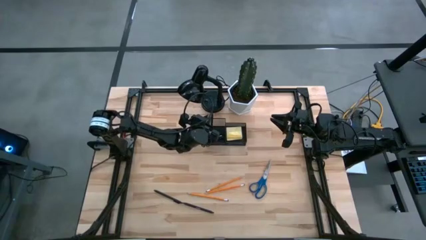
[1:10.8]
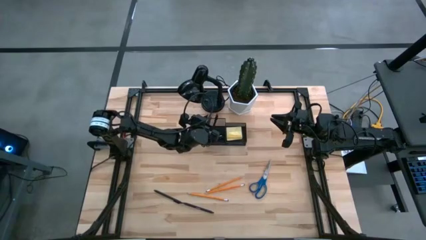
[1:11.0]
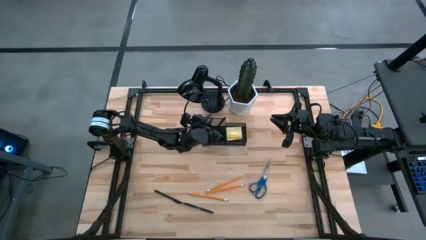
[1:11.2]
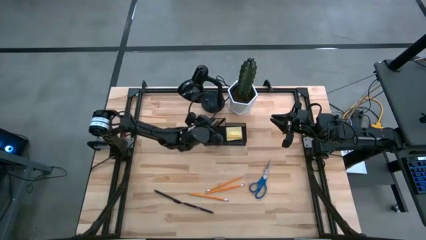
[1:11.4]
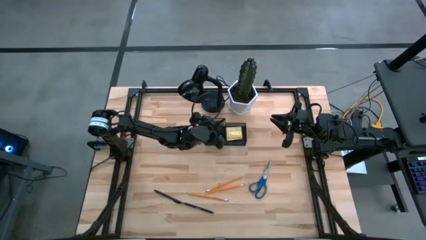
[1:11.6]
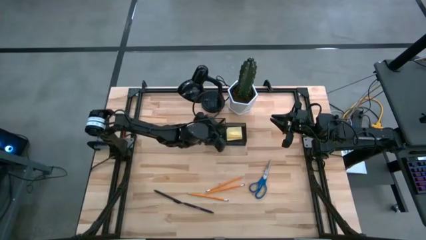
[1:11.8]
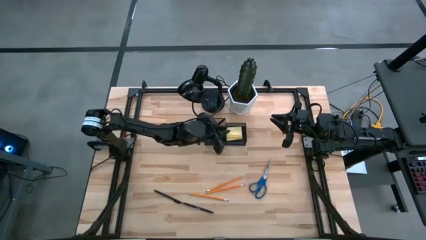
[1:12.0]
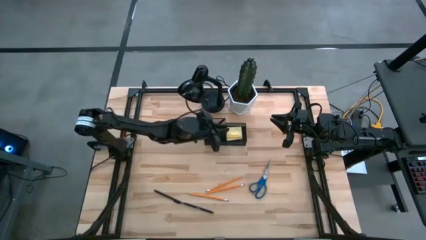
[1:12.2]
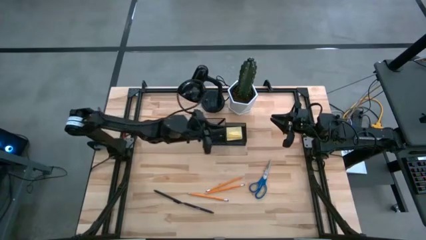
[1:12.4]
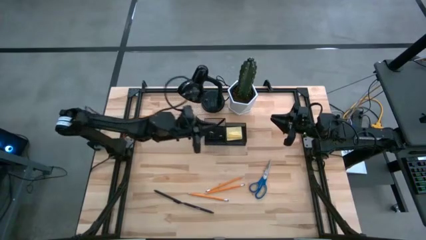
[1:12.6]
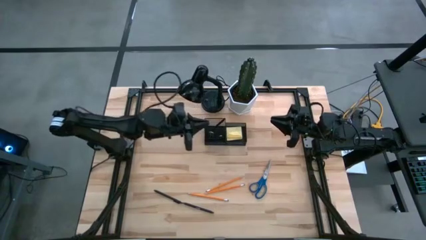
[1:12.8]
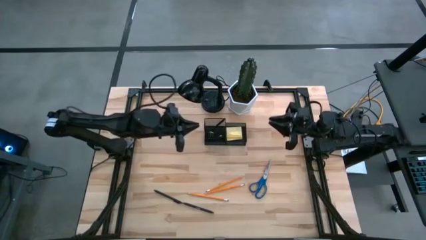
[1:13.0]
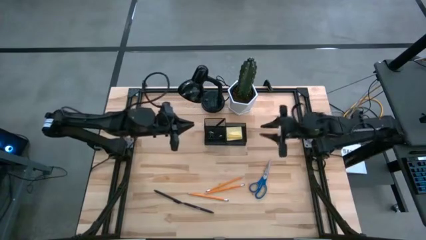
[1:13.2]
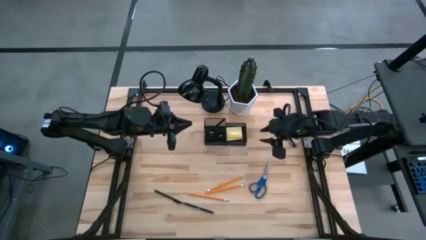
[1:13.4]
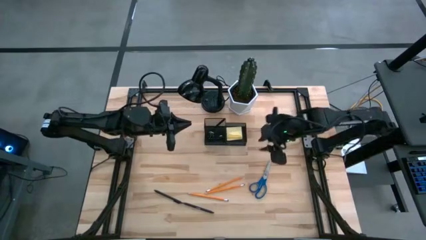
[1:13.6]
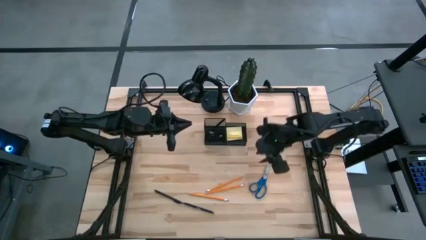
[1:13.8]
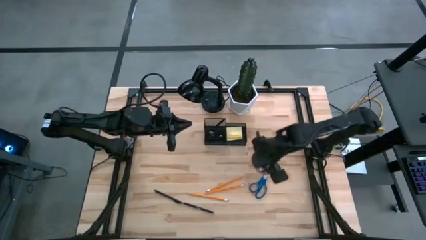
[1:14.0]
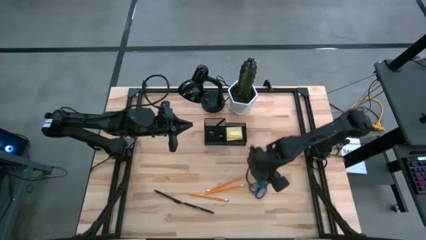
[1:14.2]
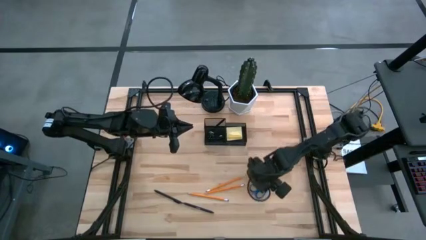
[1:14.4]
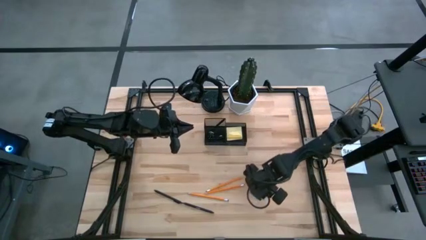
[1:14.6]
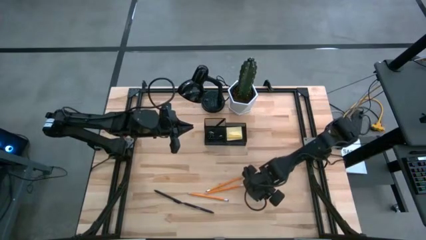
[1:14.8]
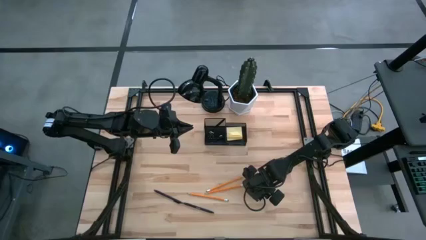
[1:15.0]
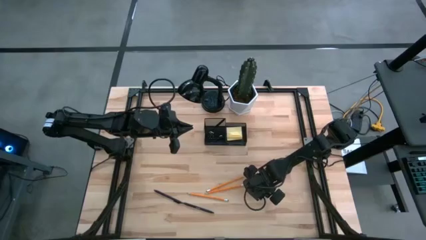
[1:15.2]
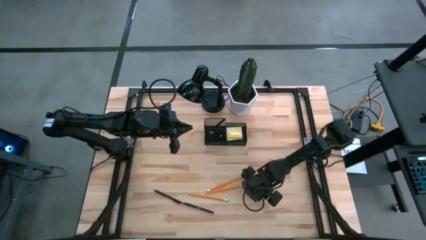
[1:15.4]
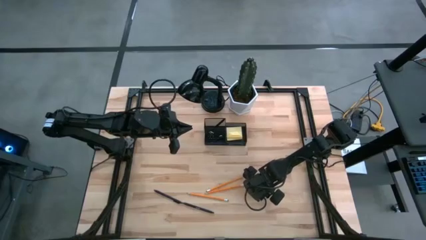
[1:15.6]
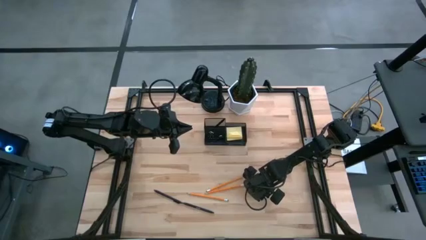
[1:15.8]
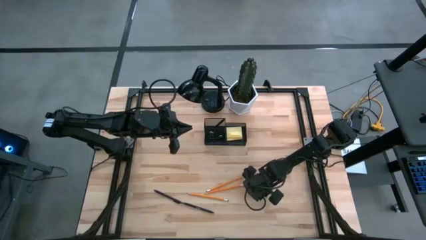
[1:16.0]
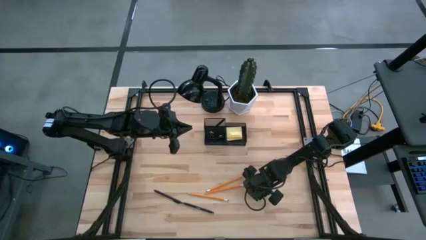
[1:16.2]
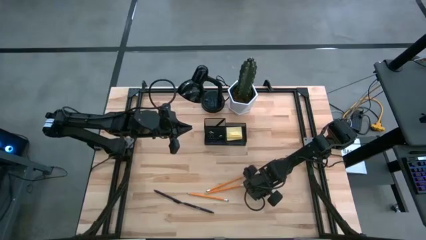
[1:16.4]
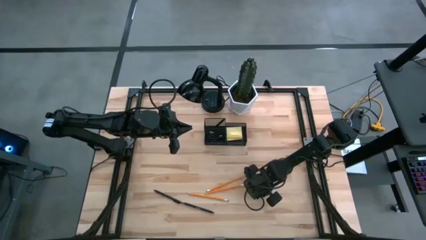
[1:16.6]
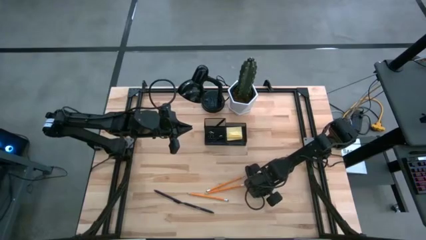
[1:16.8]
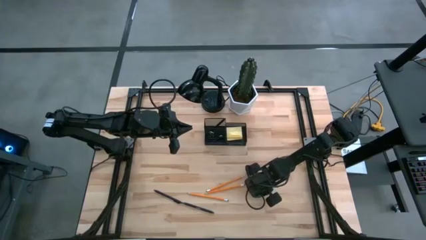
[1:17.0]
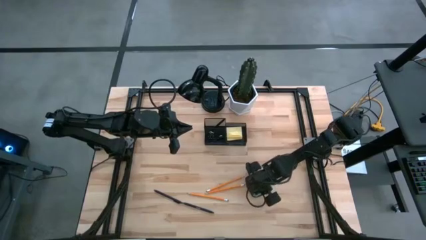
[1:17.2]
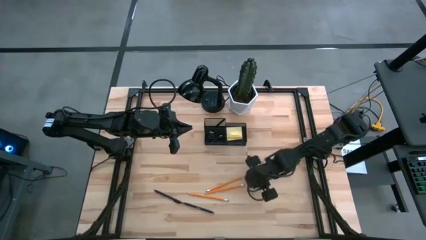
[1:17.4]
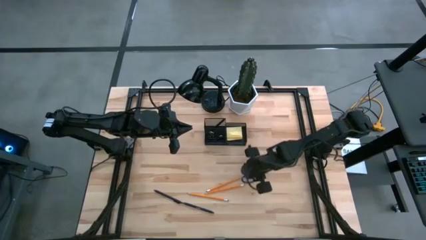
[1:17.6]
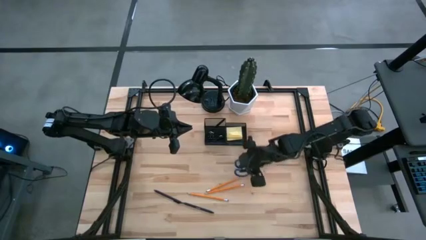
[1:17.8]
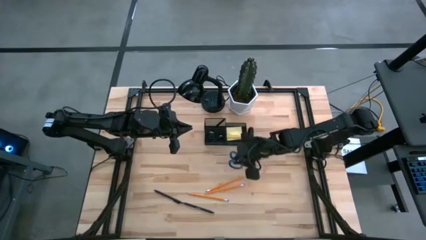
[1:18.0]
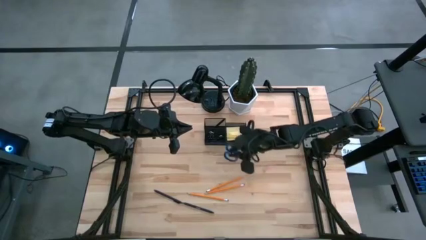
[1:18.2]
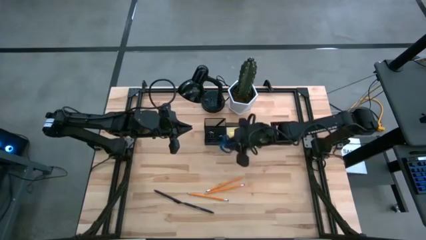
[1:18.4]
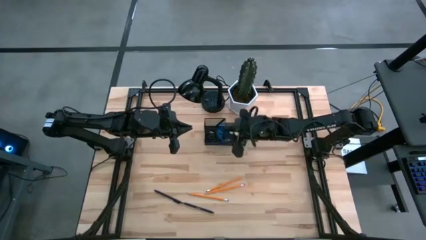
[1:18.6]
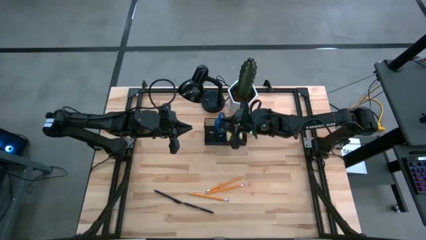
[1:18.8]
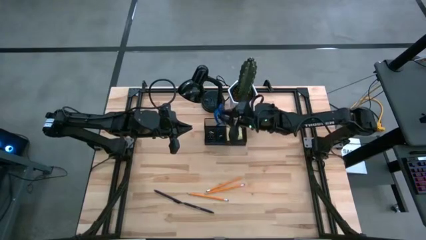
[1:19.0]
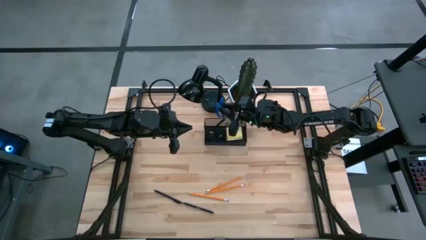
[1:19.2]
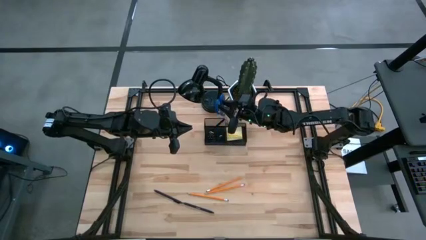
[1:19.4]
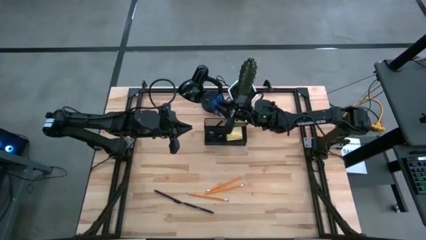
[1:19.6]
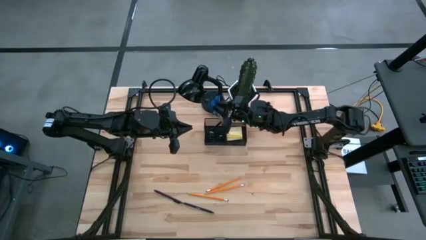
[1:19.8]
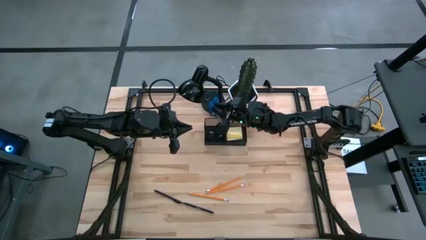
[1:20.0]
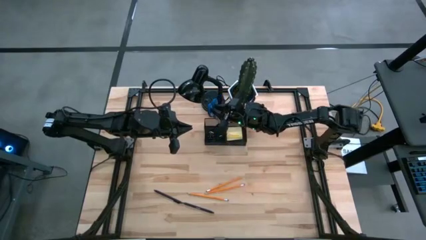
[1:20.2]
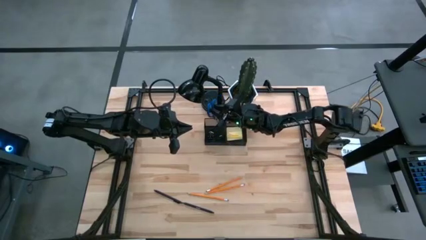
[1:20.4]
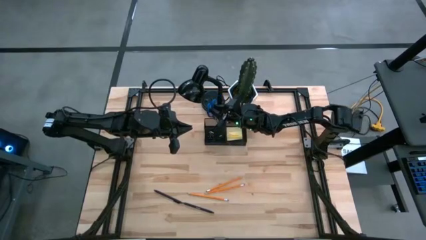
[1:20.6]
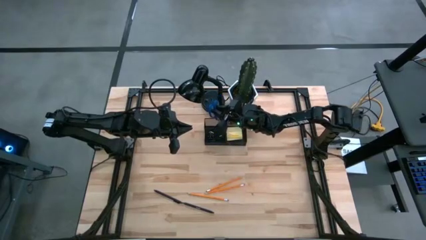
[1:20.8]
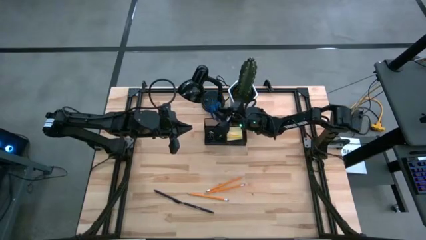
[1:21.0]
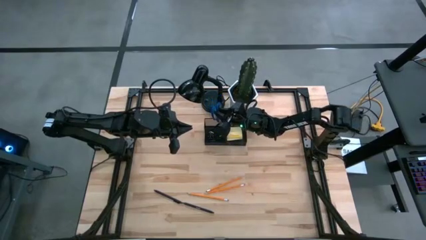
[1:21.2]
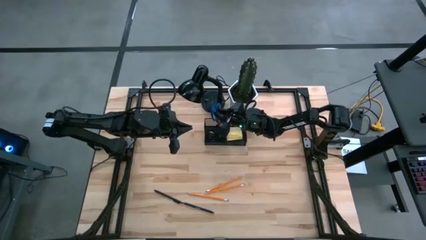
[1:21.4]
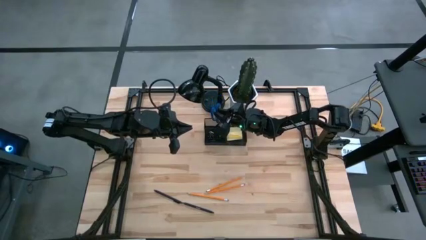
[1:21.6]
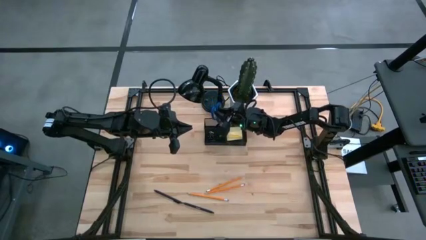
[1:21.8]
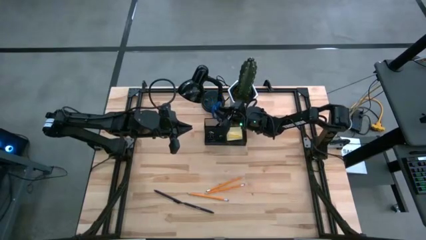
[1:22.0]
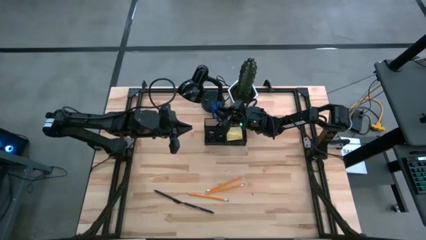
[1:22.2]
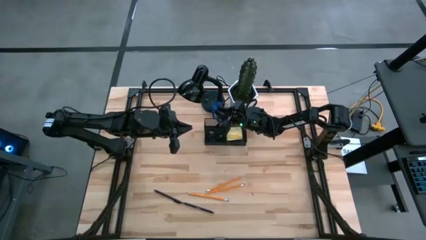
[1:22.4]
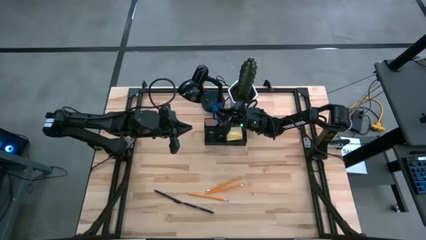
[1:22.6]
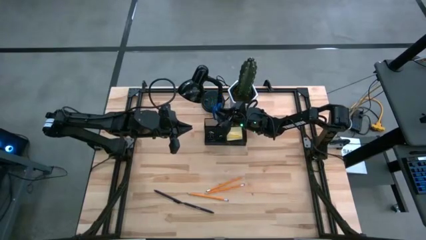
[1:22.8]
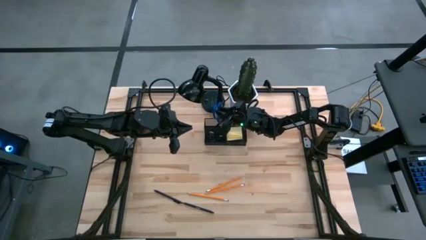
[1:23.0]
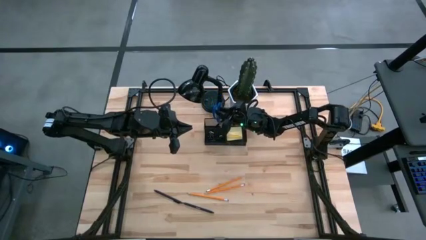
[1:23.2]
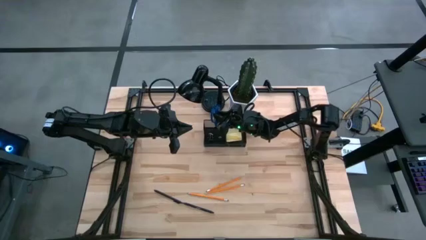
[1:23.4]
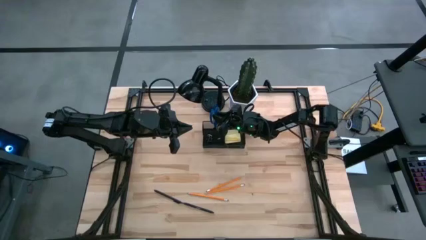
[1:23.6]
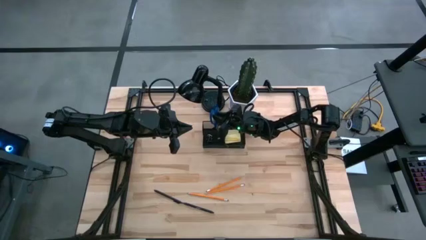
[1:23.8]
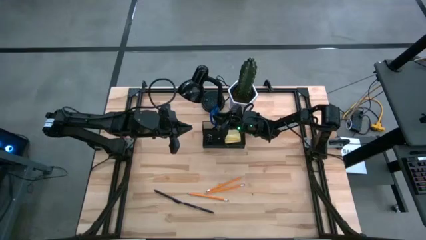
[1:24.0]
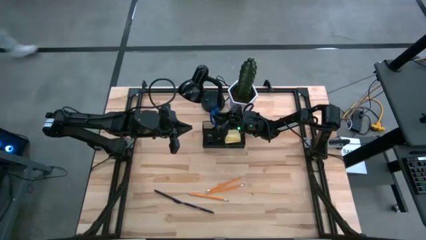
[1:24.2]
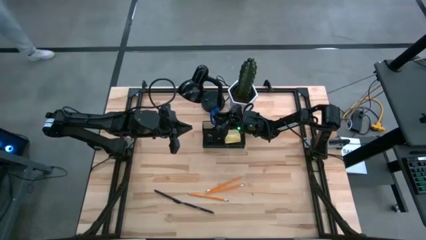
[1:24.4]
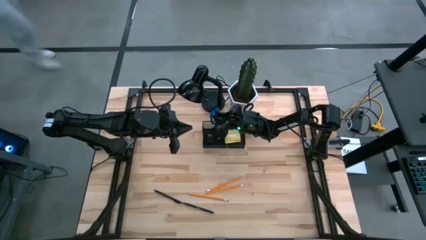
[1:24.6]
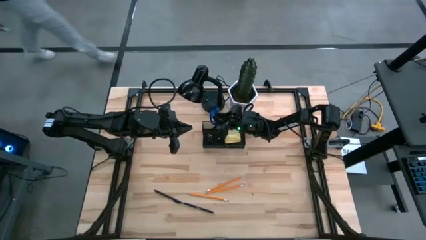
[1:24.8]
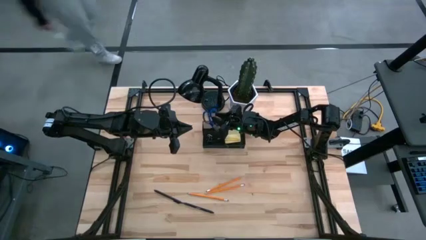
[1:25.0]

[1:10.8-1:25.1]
Task: Pick and place office supplies into organizer
Put the blue scissors into the black desk organizer
